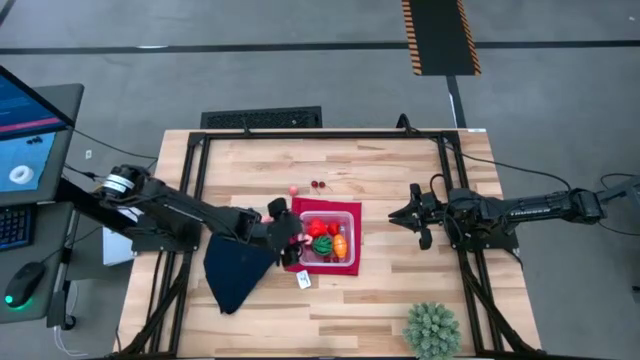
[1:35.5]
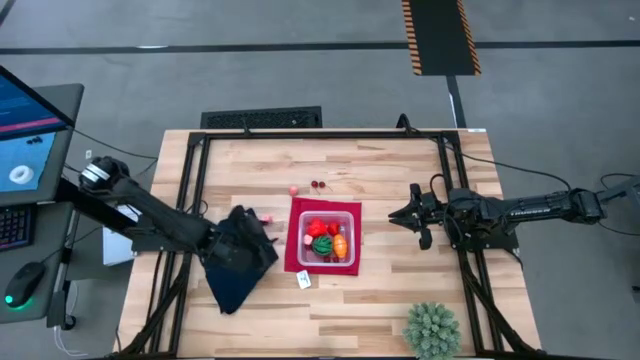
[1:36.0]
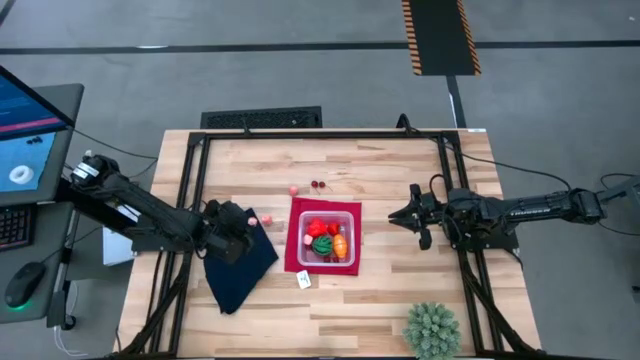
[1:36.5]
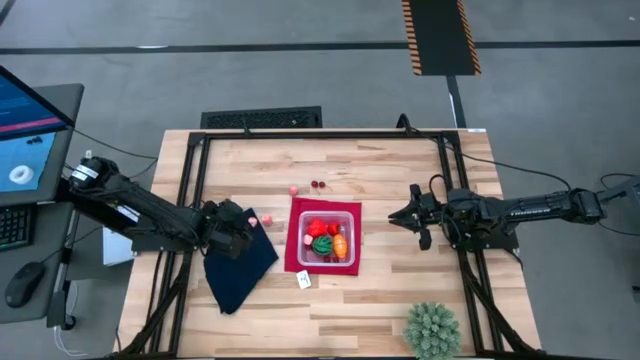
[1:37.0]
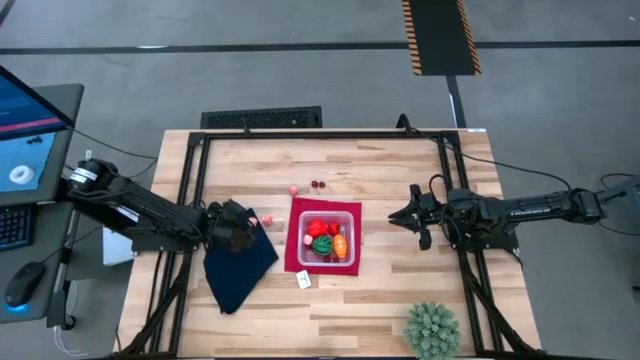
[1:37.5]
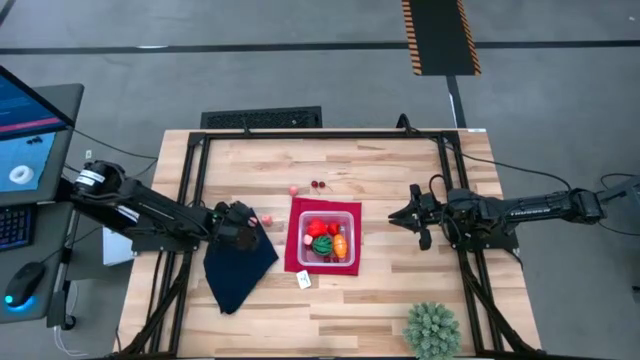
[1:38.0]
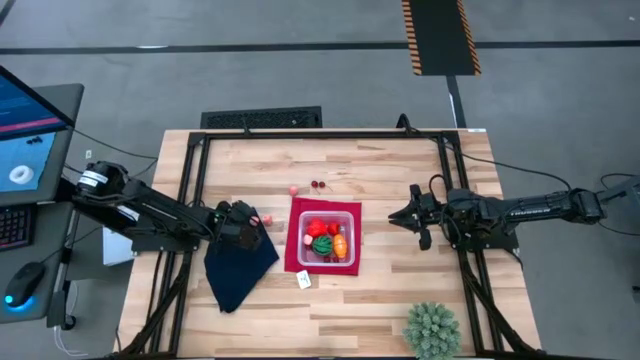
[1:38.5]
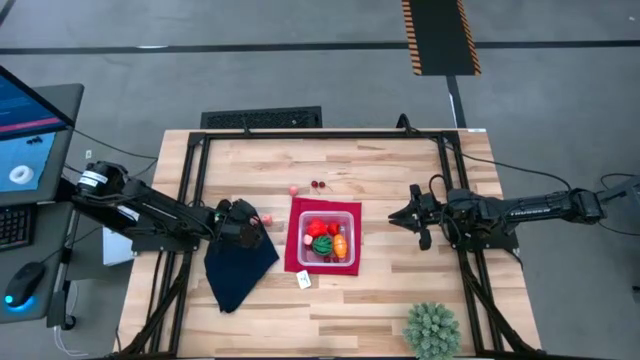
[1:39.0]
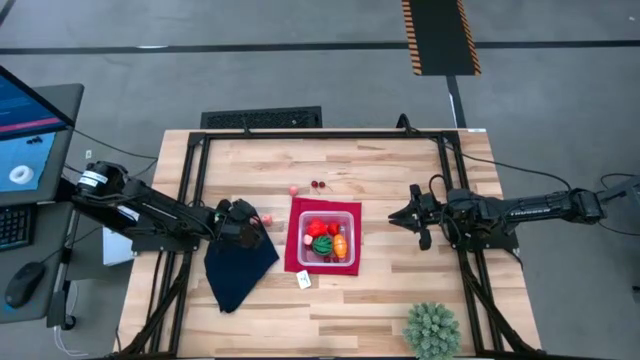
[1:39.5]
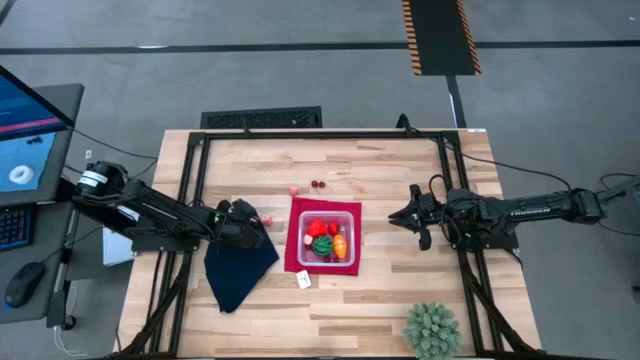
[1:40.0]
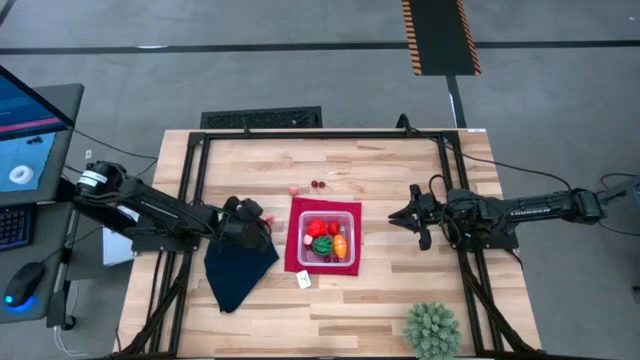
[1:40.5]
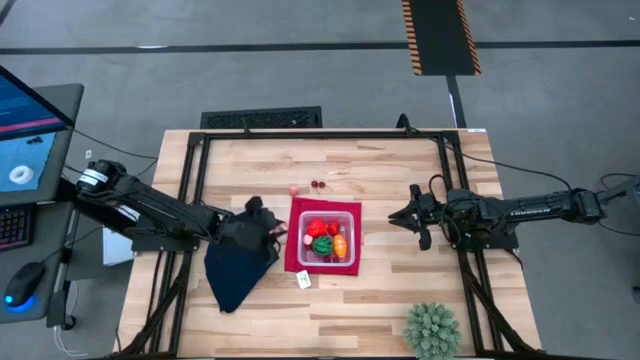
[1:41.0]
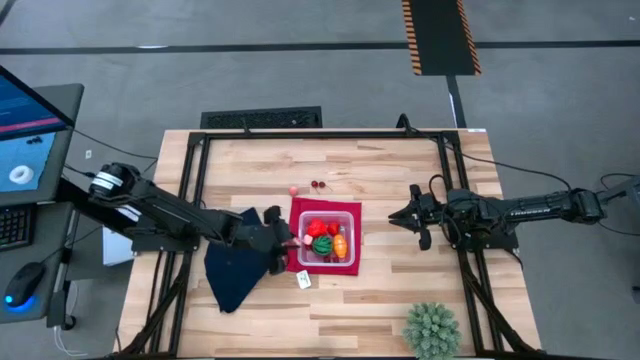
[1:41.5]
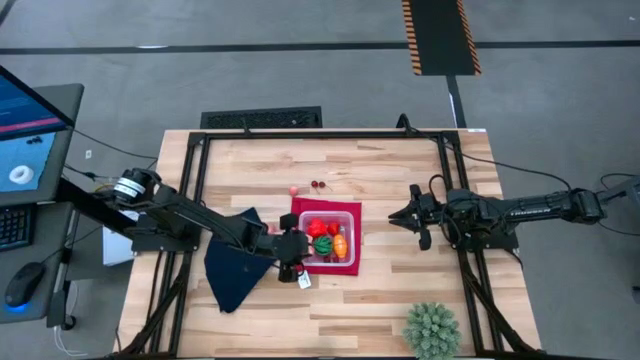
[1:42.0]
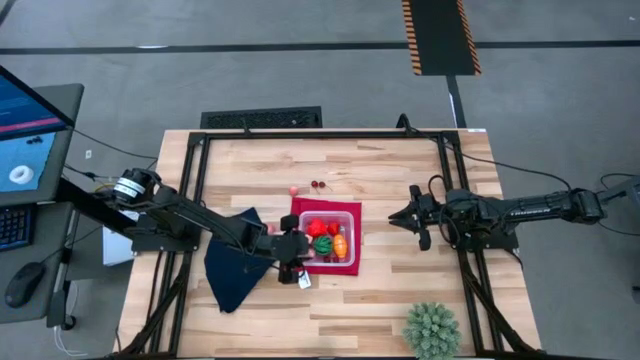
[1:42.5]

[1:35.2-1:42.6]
Task: Pick and placing Produce into tupperware
Put the peach in the transparent bin

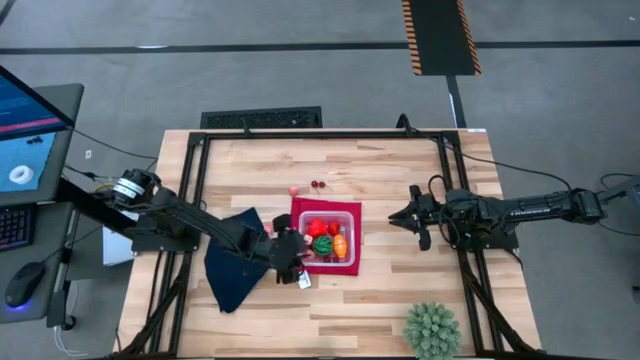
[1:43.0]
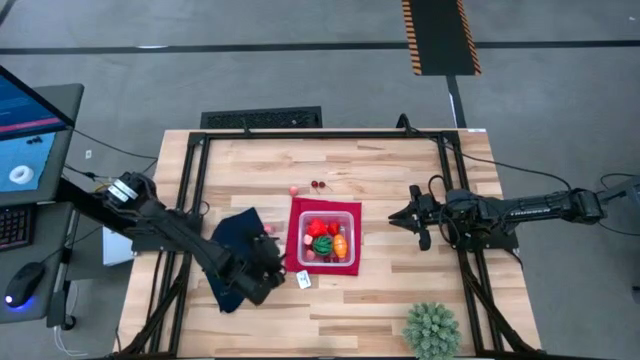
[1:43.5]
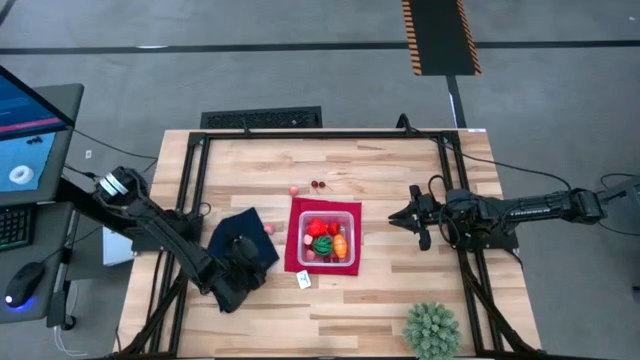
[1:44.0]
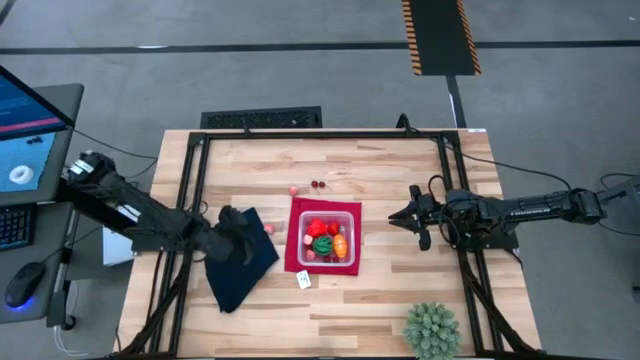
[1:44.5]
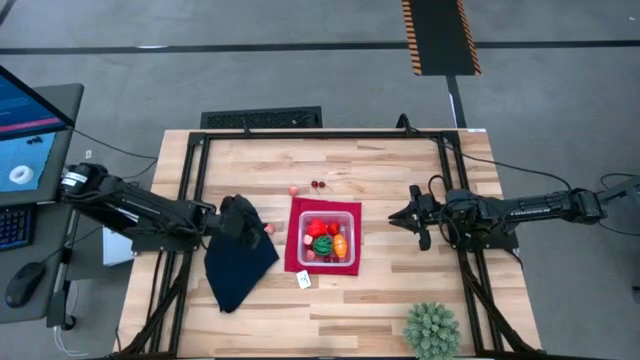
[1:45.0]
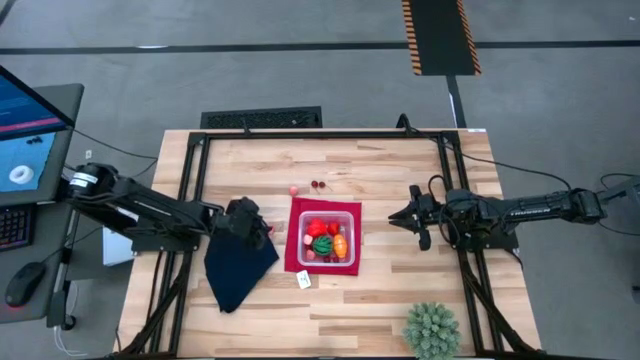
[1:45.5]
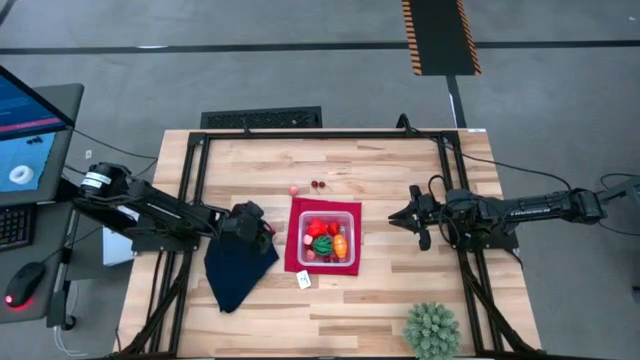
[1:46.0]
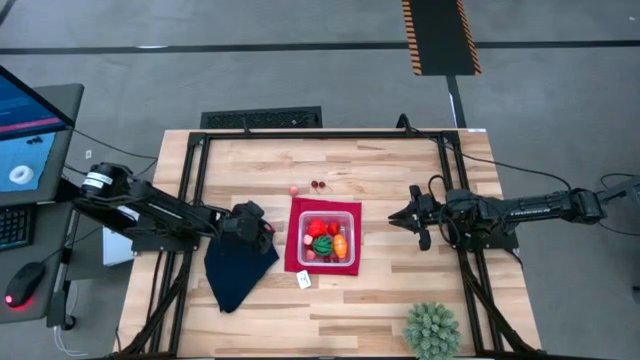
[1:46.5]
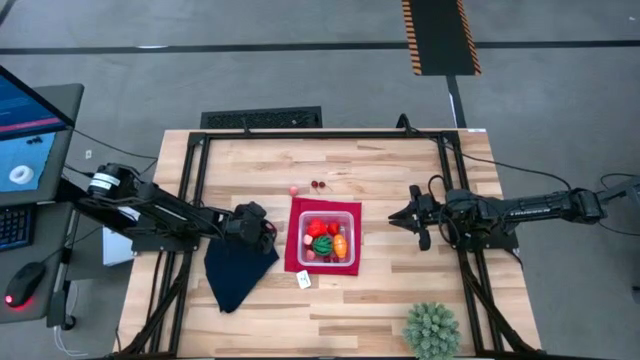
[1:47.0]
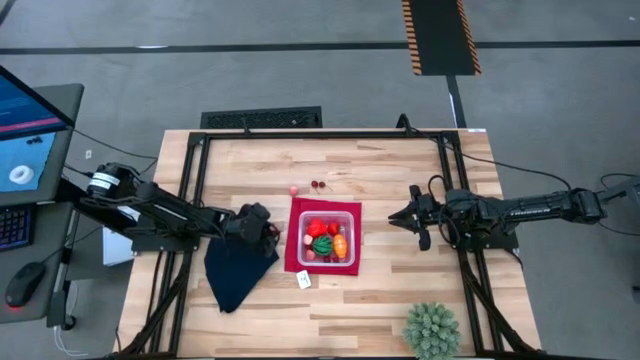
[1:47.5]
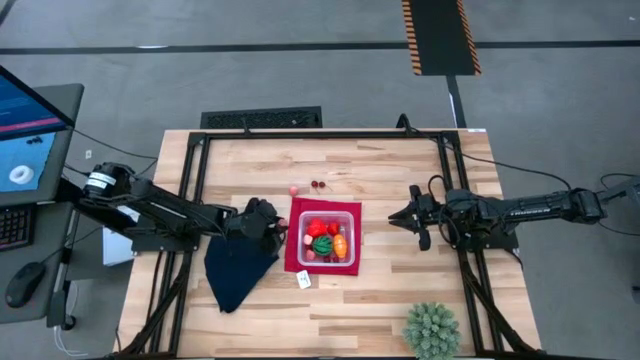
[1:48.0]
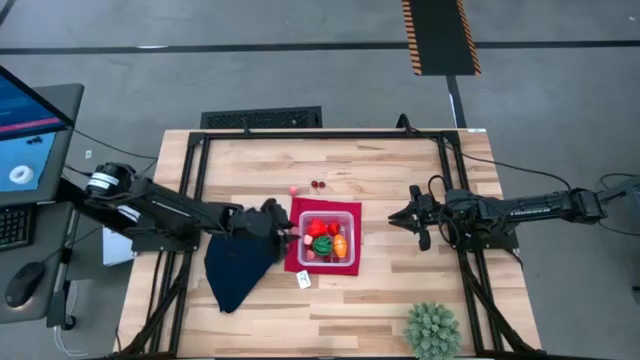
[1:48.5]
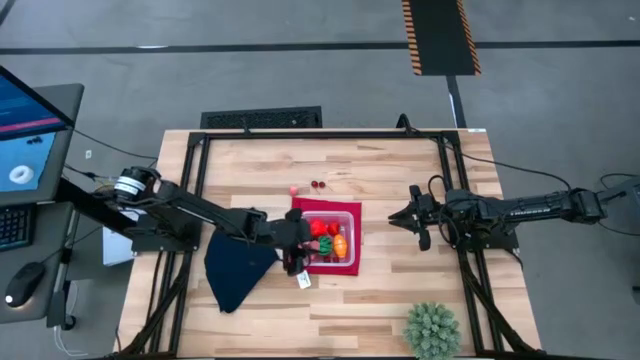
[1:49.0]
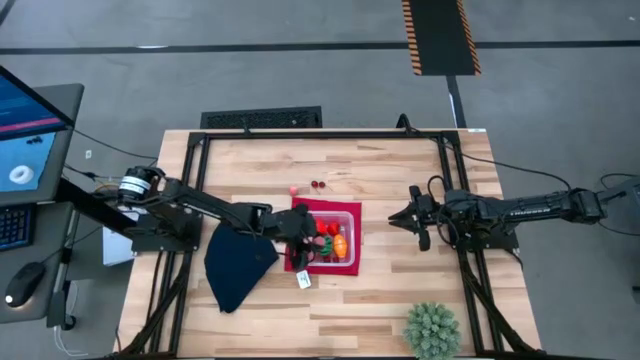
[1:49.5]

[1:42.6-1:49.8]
Put the peach in the transparent bin

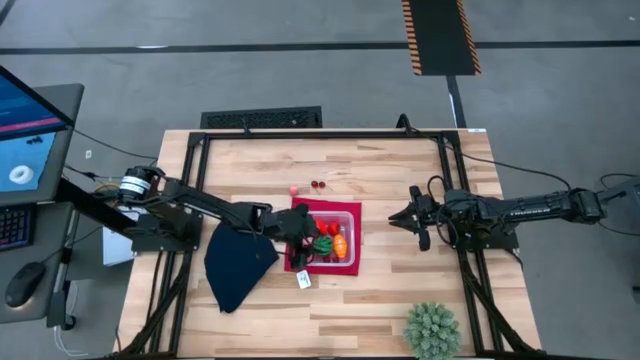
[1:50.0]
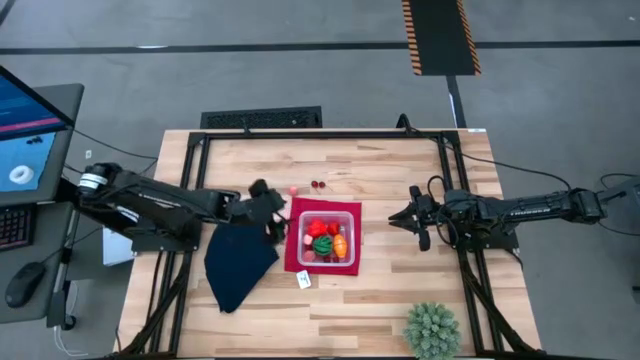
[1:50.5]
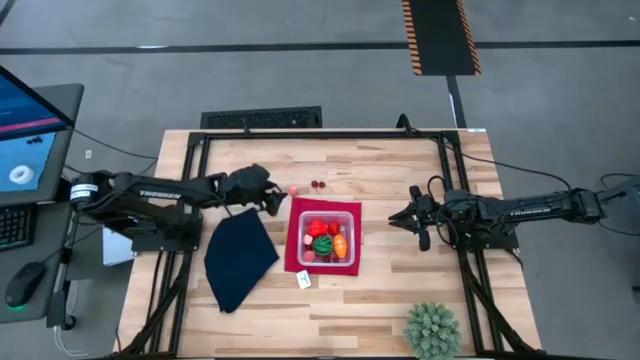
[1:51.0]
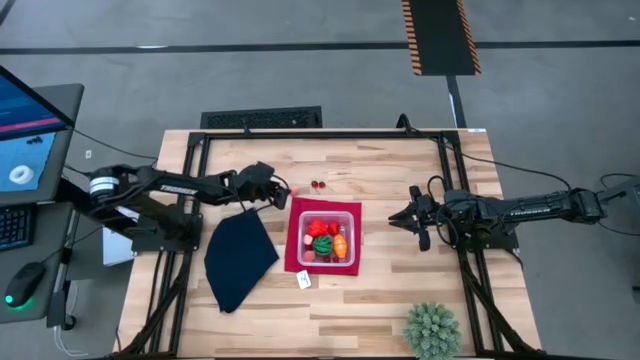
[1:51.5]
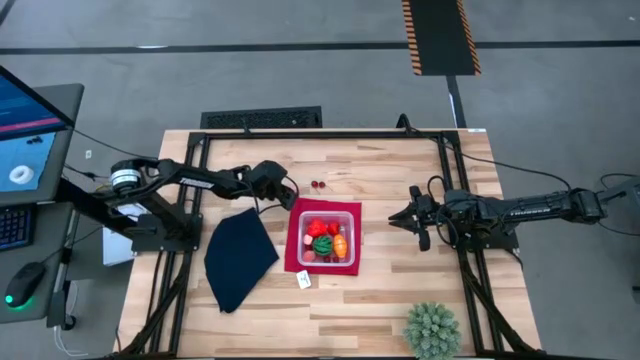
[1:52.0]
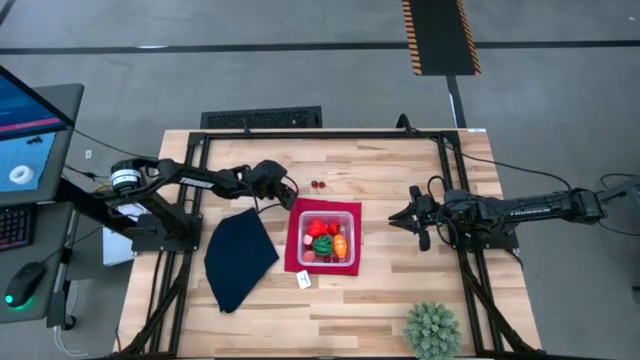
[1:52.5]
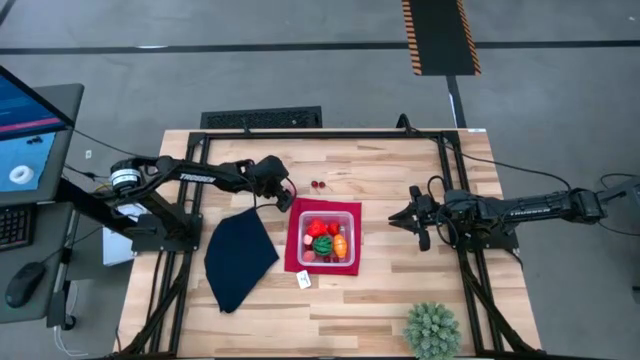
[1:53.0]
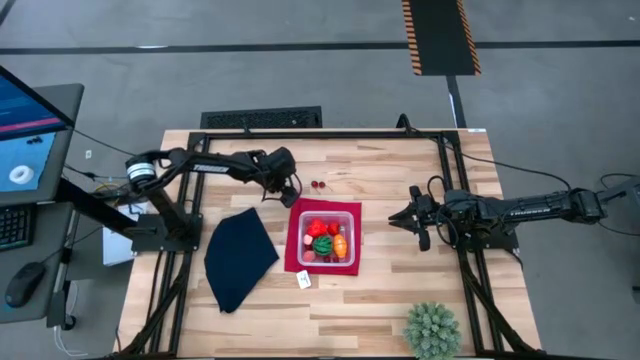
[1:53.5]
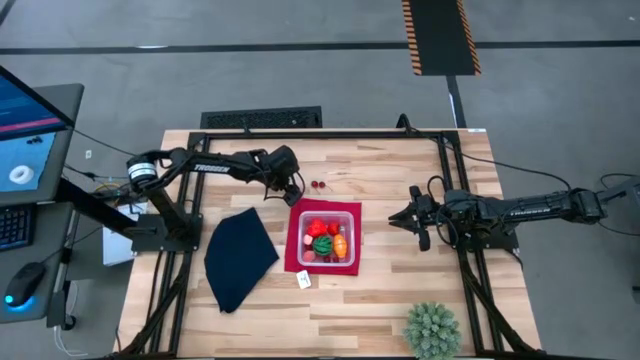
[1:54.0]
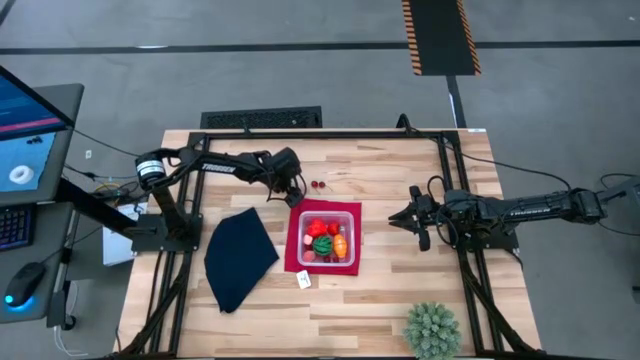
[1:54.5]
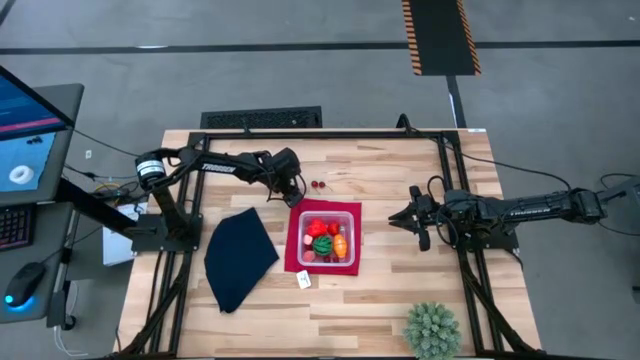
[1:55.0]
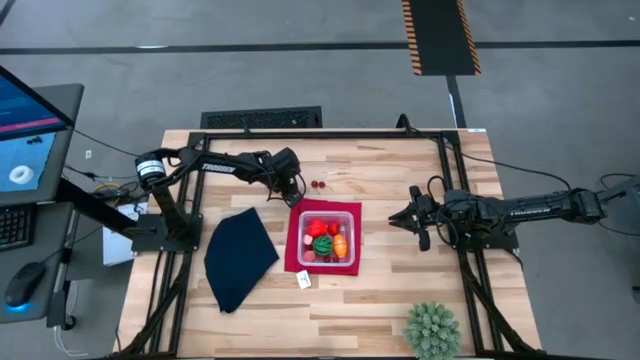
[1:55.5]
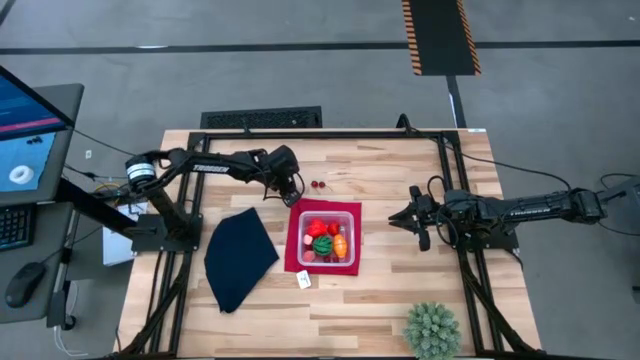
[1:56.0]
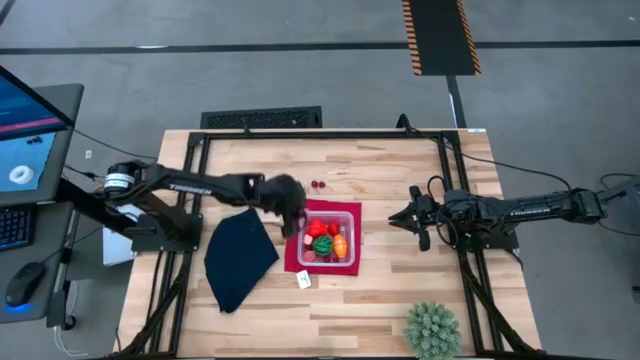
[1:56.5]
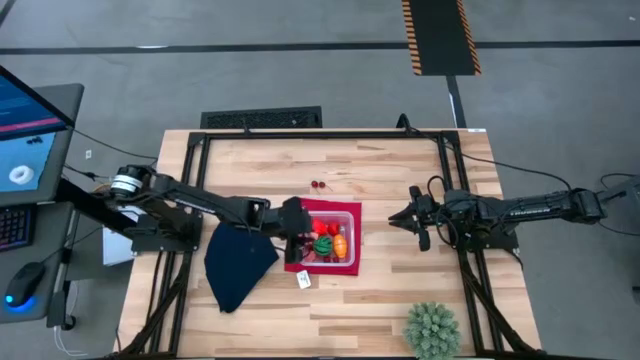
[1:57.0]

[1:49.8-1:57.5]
Put the peach in the transparent bin
